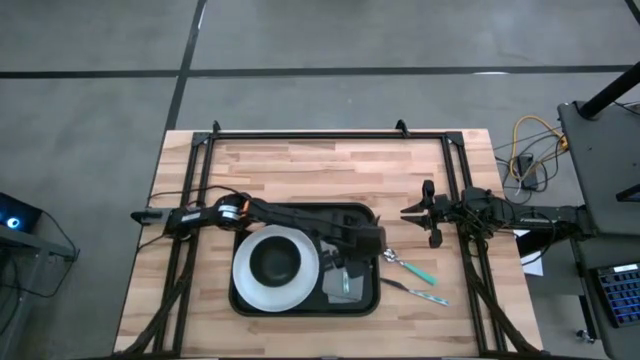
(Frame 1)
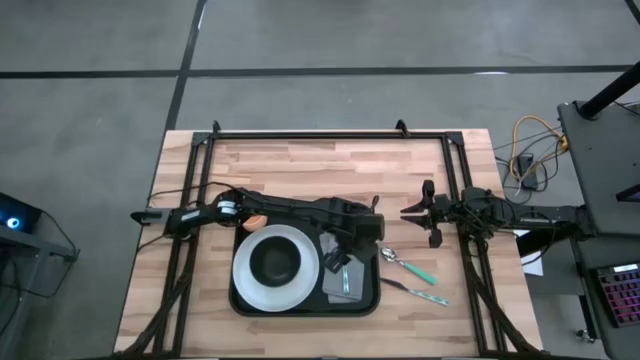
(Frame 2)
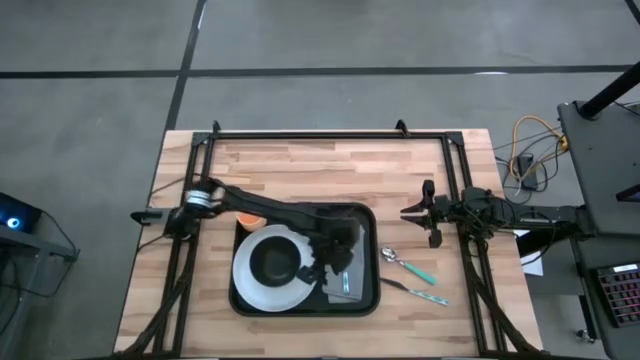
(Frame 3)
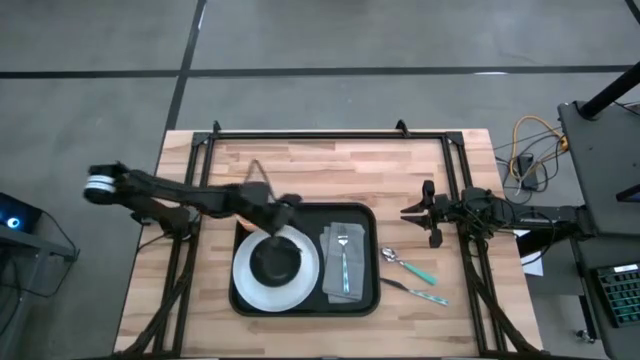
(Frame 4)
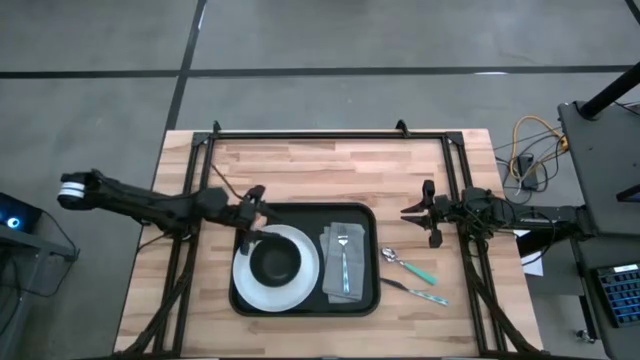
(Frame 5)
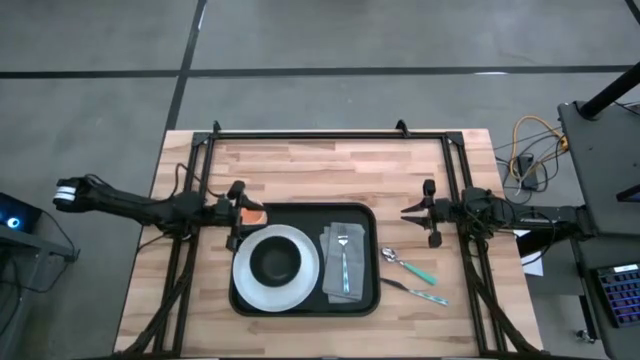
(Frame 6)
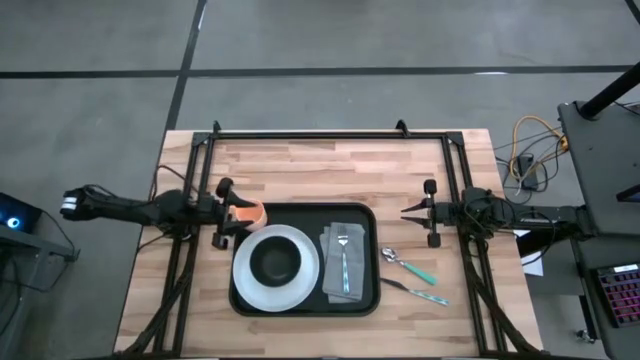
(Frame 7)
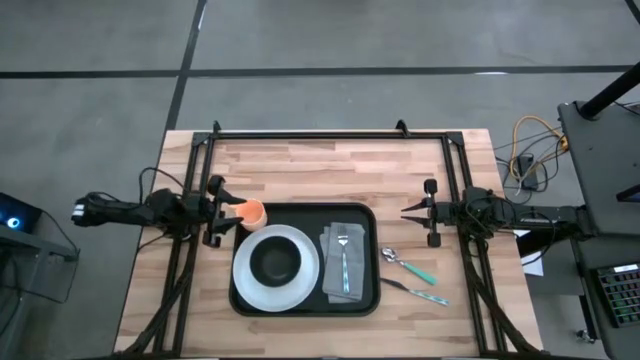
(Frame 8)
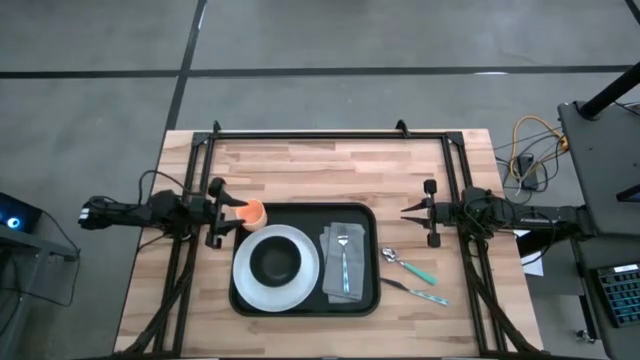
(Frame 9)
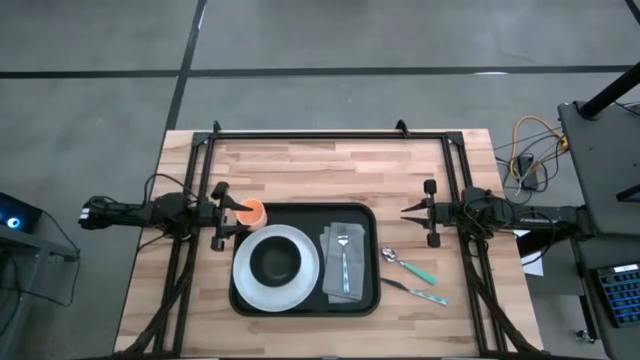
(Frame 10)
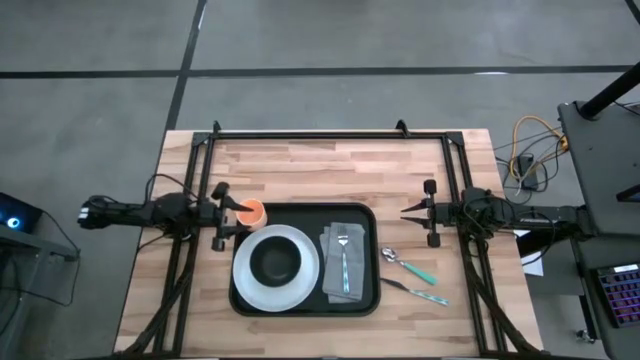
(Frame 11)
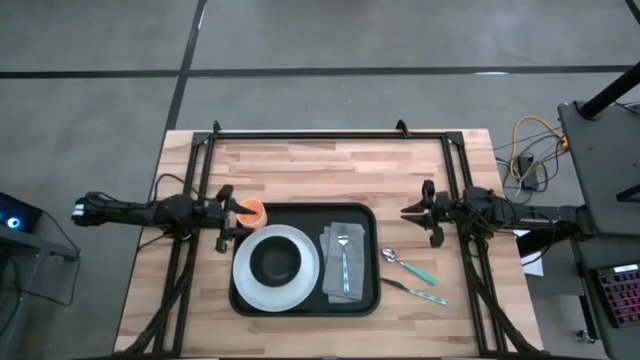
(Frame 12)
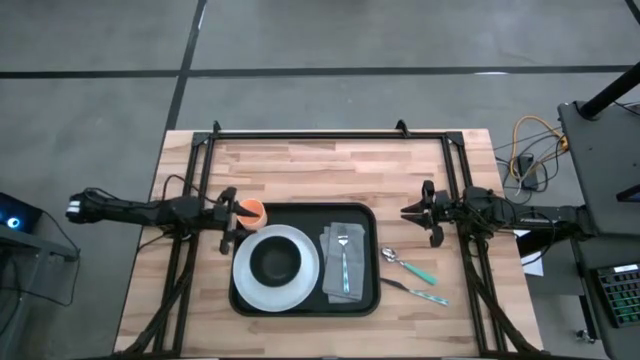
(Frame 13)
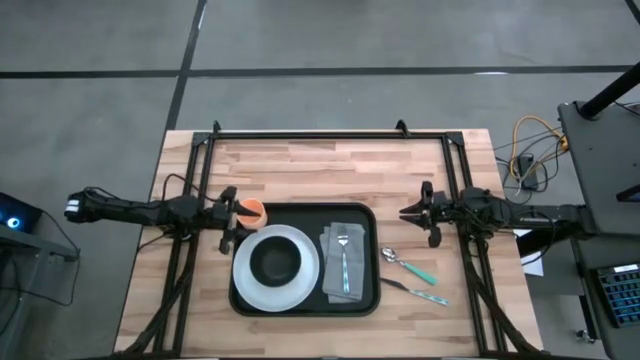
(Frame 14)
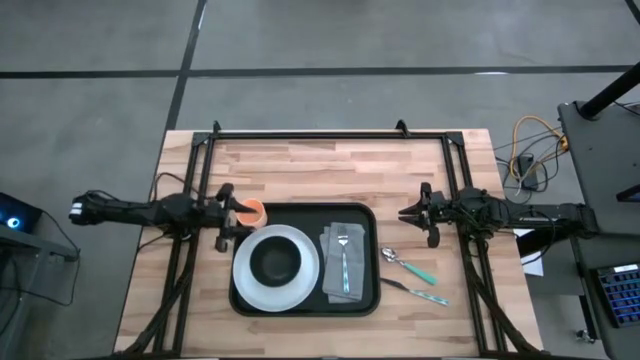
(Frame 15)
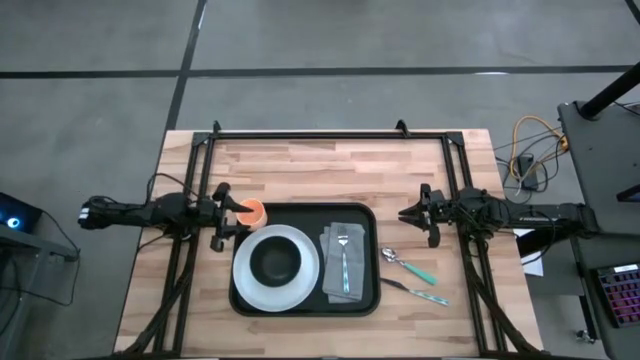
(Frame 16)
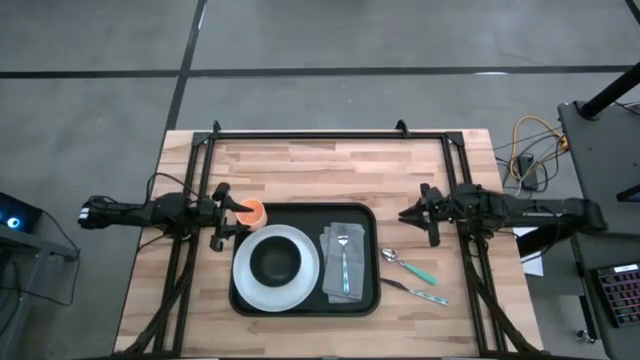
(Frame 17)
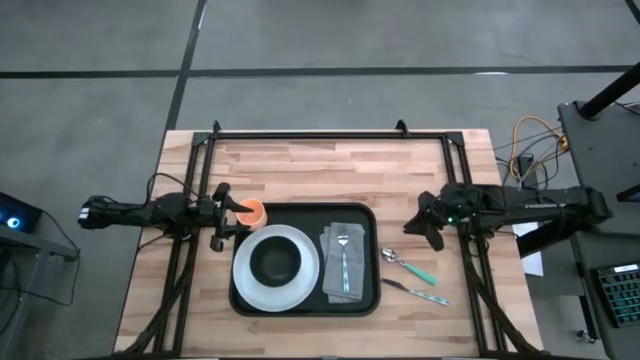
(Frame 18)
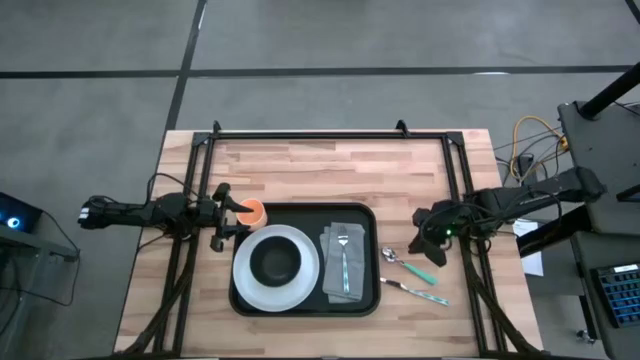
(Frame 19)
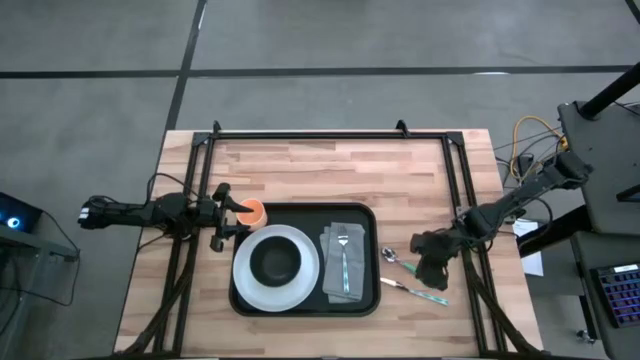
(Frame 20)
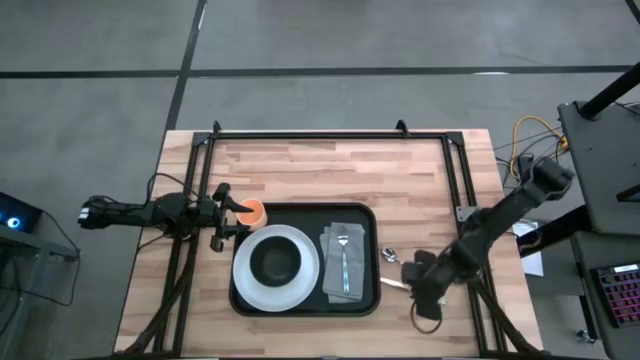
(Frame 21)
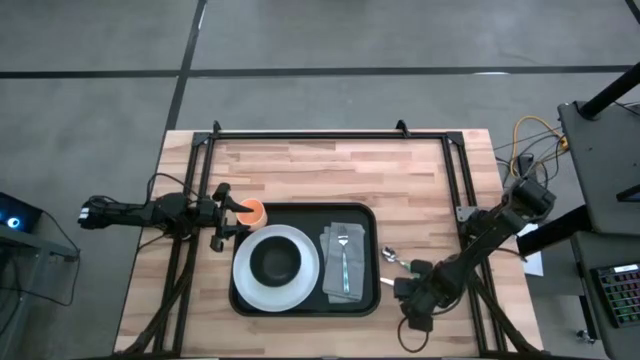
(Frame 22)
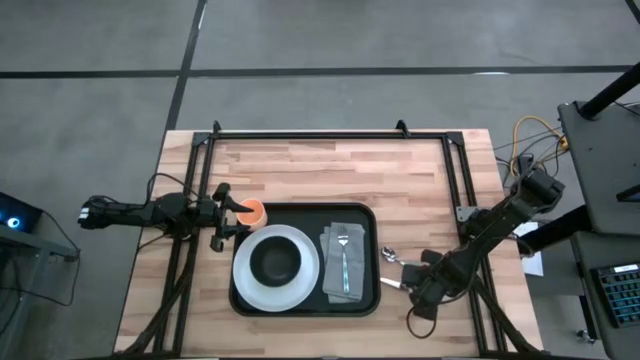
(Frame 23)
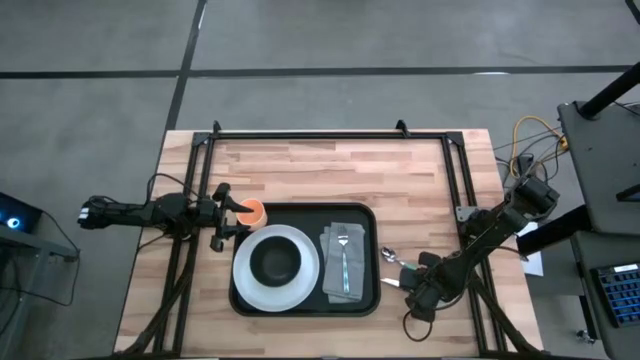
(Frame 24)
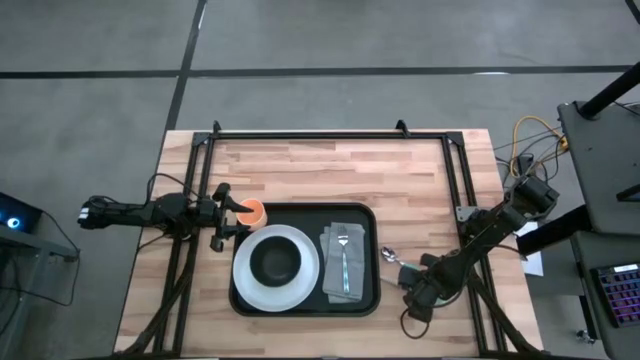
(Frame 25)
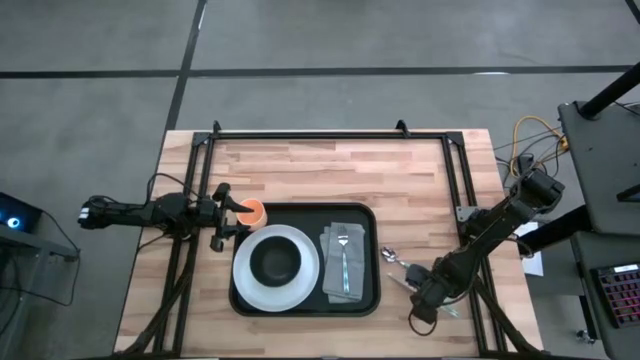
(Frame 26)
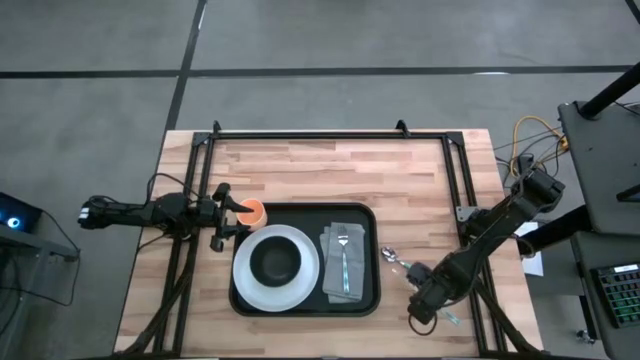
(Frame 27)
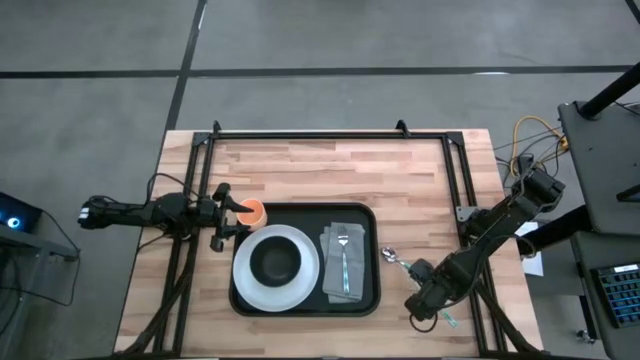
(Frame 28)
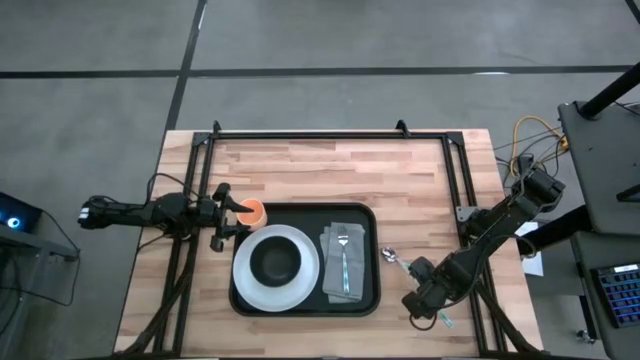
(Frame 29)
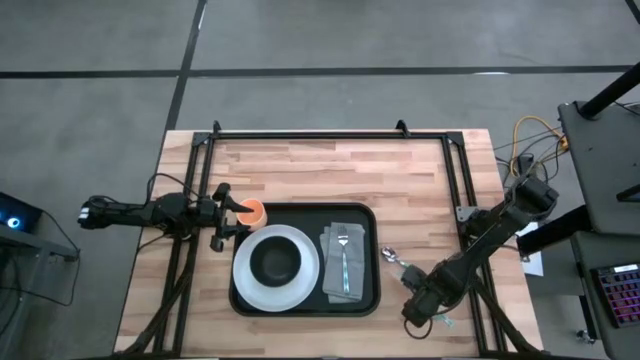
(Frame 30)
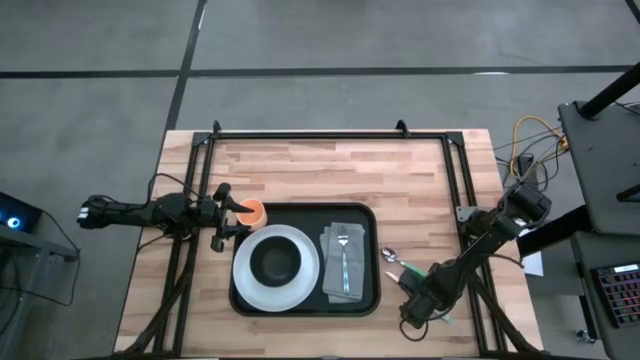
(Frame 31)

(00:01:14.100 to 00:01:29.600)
Task: Set up tray
Put the knife on the table

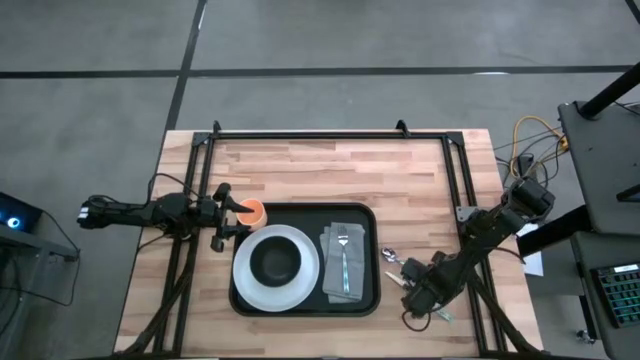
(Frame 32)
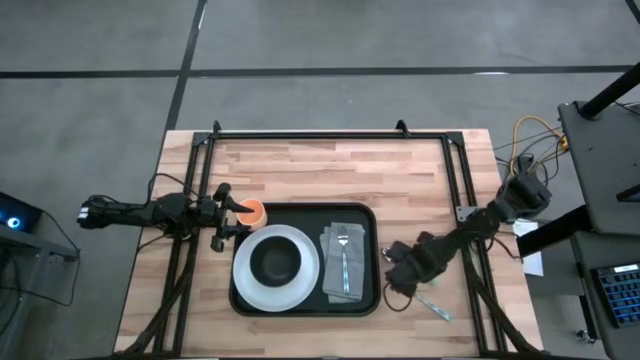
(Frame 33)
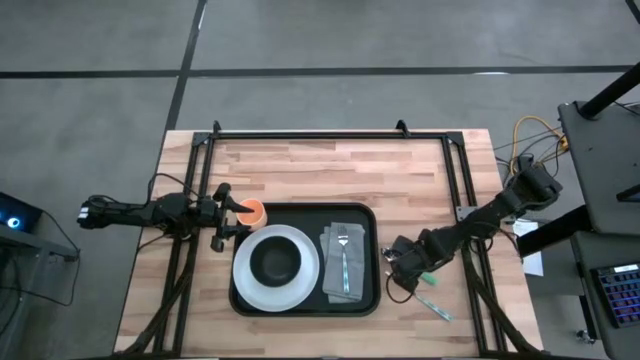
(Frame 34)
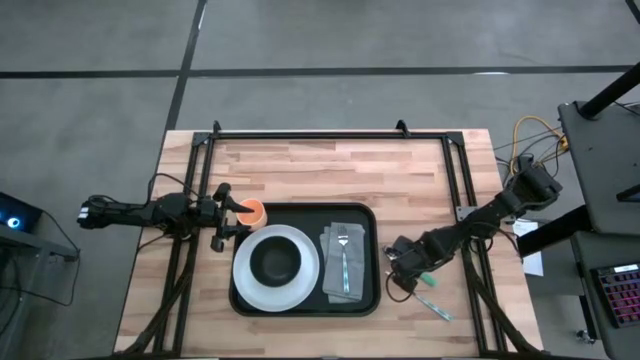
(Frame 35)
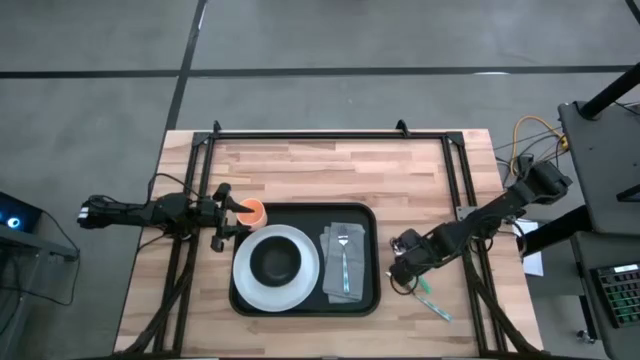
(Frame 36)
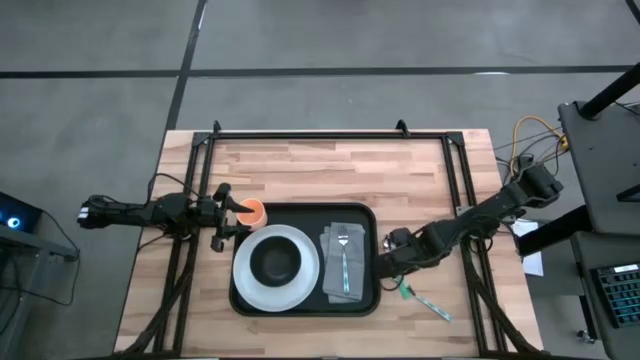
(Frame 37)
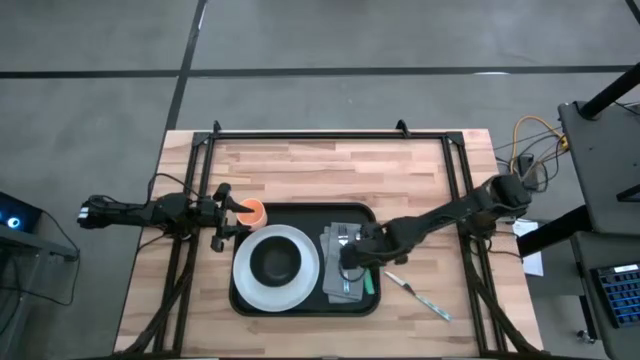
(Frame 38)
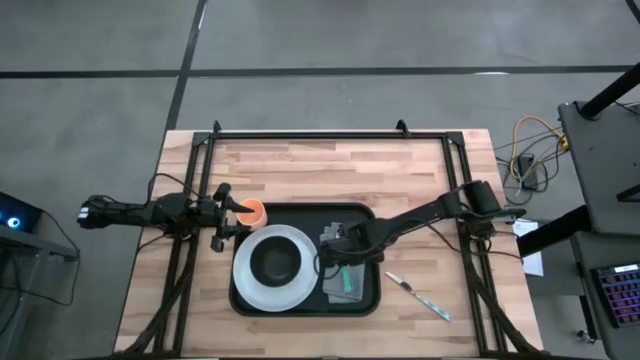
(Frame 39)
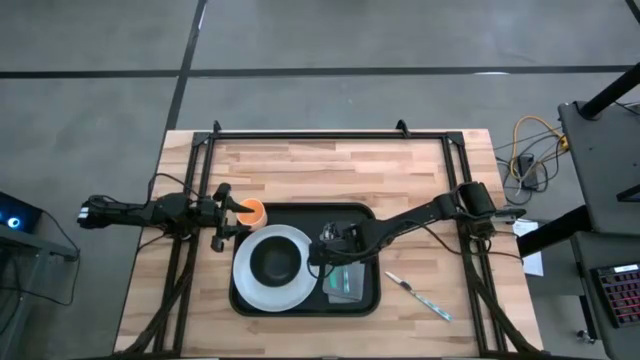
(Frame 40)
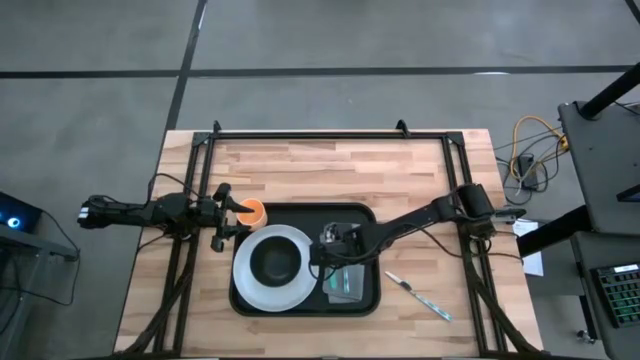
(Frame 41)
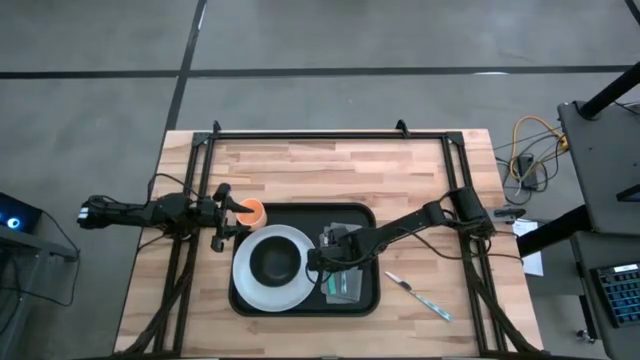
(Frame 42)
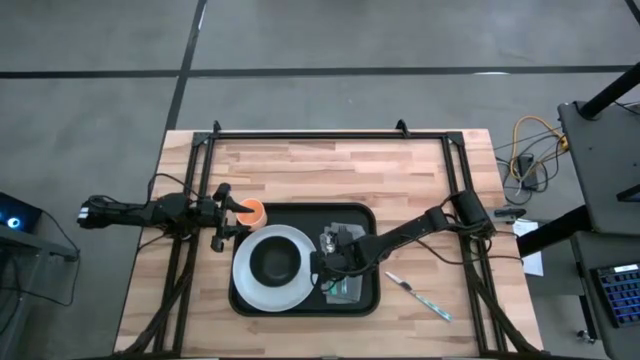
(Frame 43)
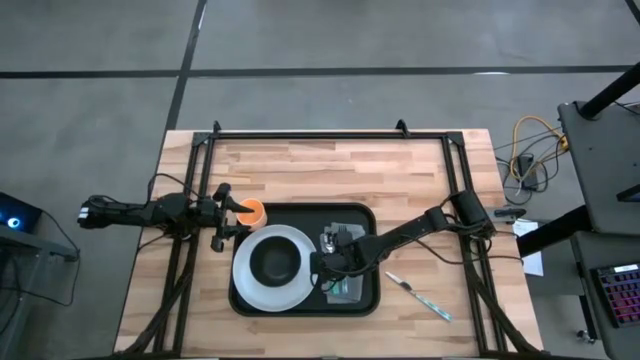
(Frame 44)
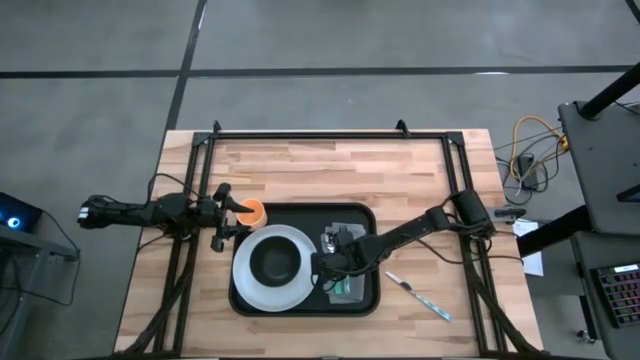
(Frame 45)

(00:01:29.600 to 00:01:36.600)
Put the spoon on the table napkin
